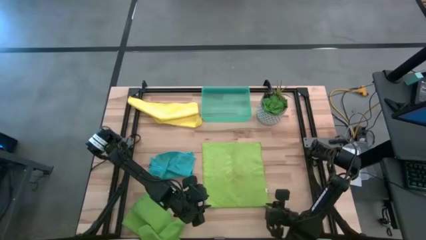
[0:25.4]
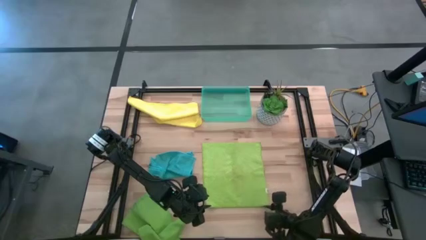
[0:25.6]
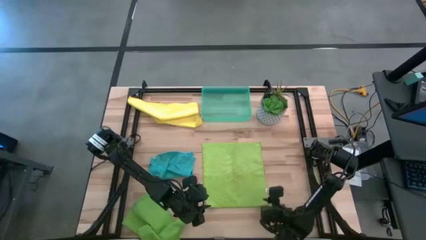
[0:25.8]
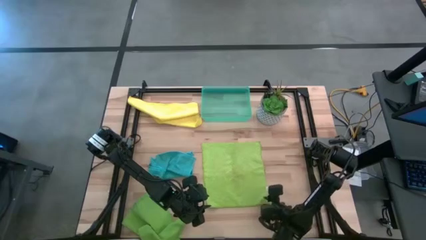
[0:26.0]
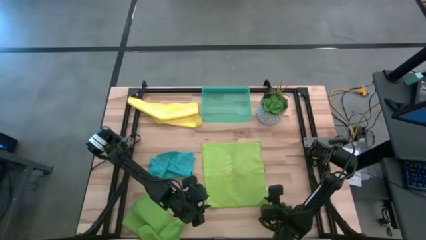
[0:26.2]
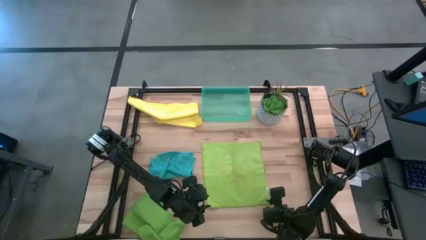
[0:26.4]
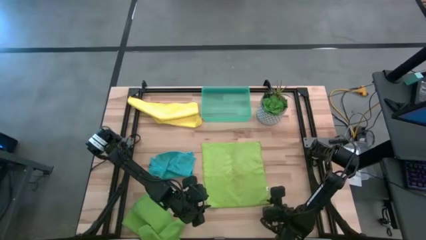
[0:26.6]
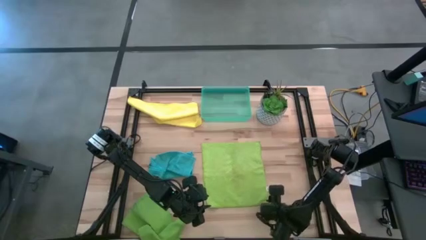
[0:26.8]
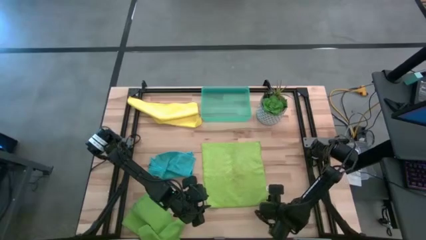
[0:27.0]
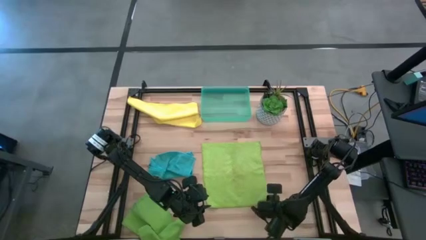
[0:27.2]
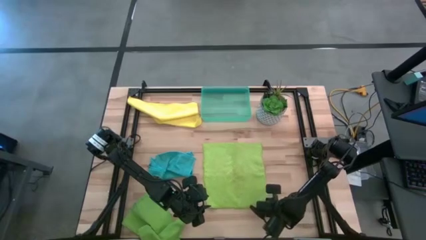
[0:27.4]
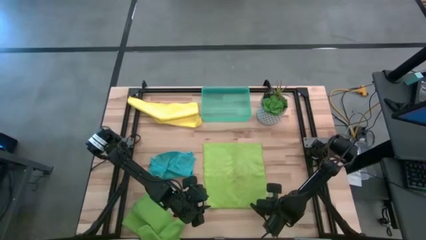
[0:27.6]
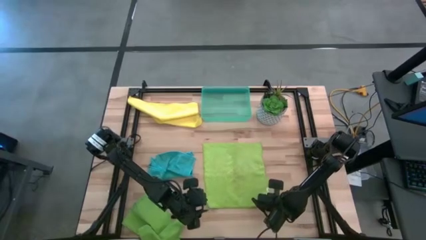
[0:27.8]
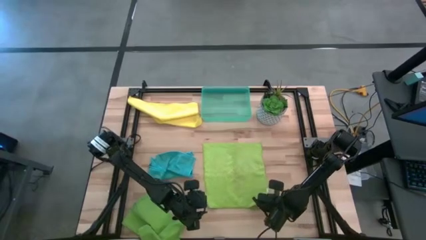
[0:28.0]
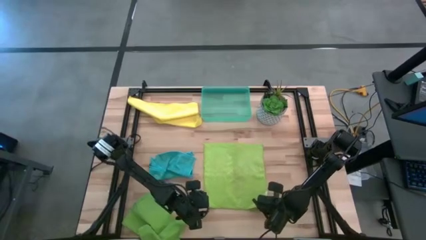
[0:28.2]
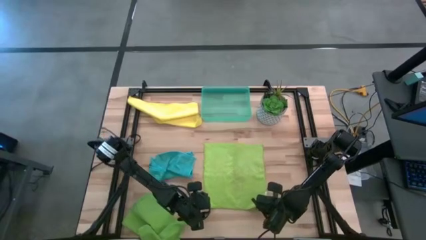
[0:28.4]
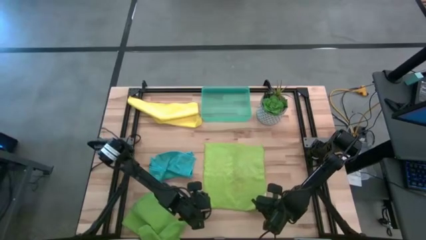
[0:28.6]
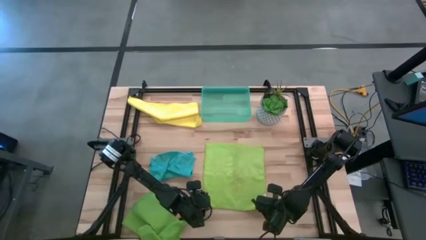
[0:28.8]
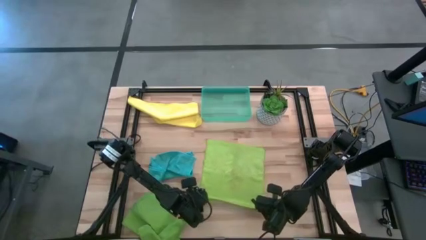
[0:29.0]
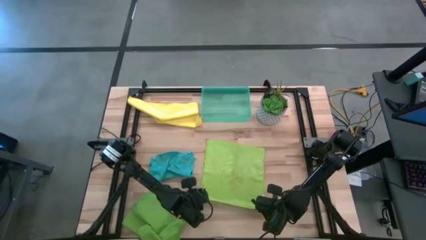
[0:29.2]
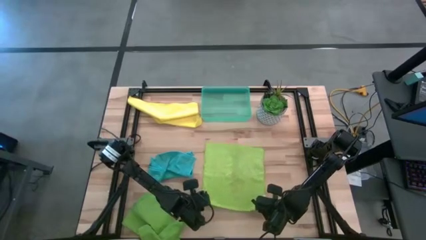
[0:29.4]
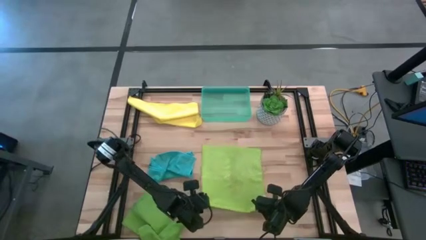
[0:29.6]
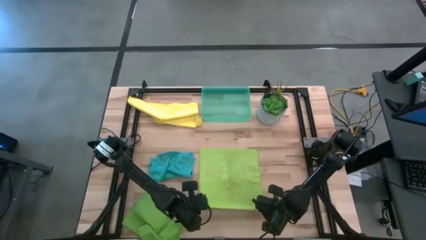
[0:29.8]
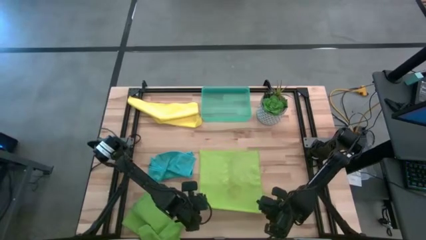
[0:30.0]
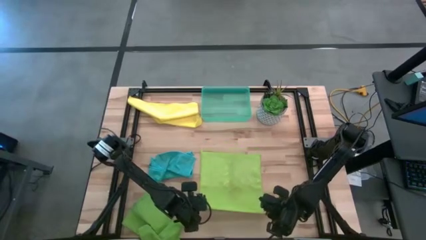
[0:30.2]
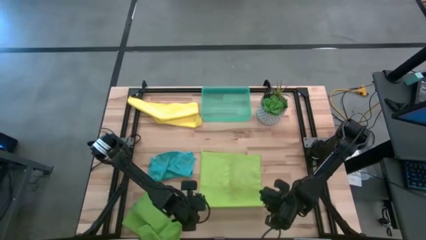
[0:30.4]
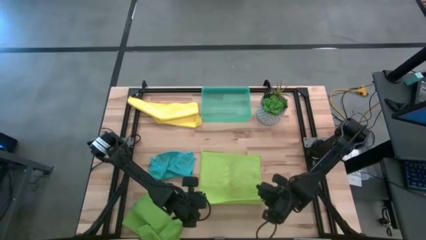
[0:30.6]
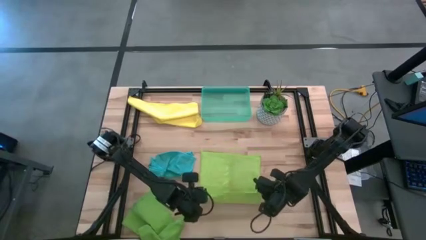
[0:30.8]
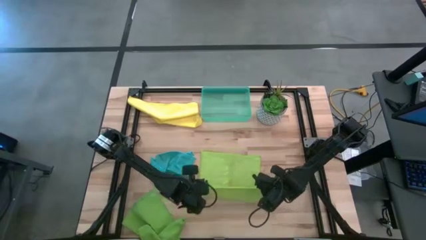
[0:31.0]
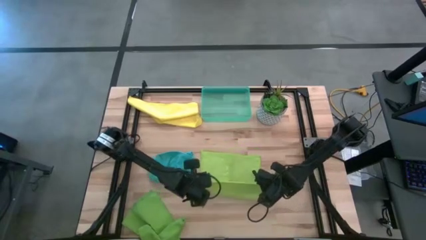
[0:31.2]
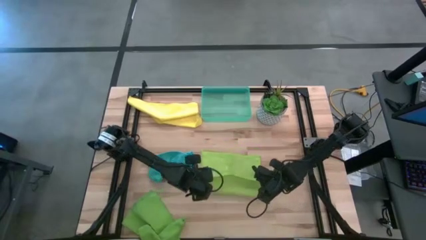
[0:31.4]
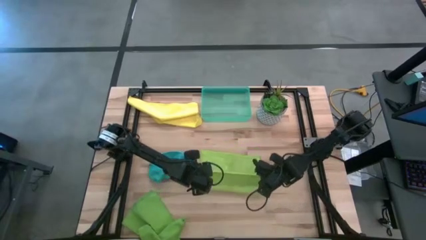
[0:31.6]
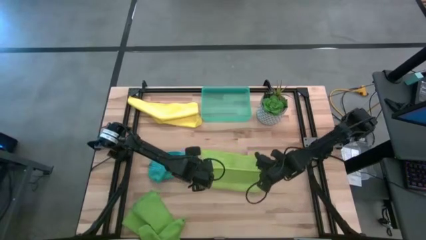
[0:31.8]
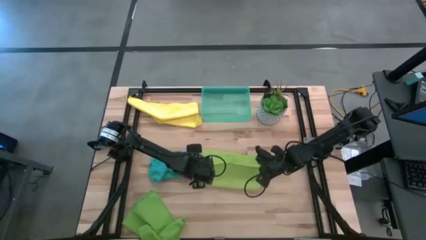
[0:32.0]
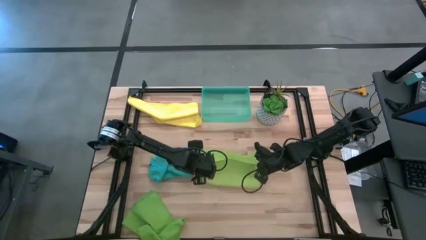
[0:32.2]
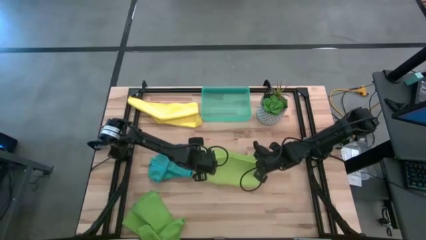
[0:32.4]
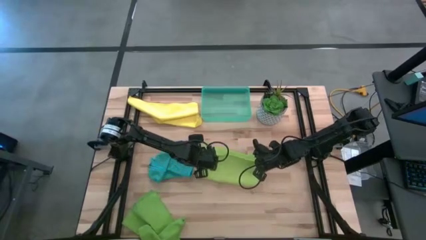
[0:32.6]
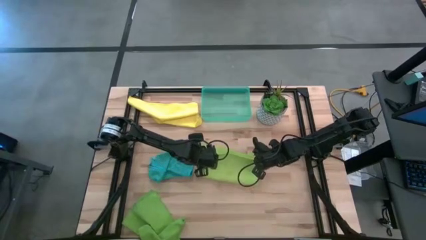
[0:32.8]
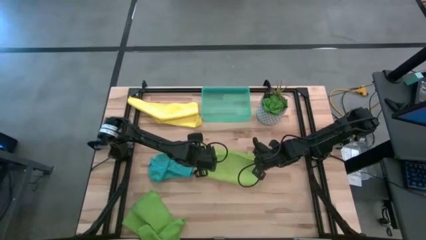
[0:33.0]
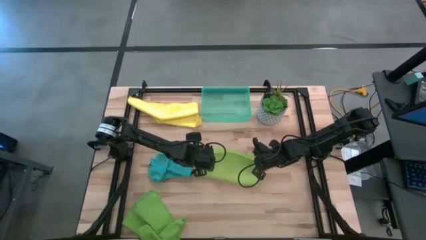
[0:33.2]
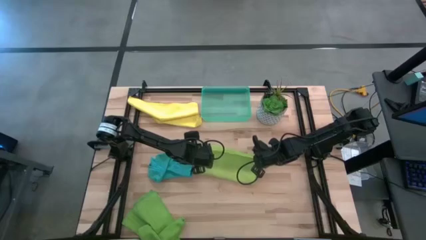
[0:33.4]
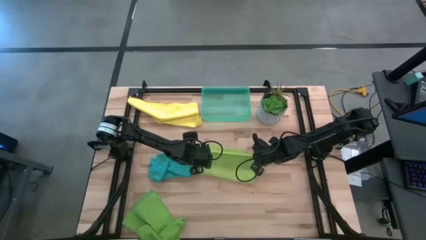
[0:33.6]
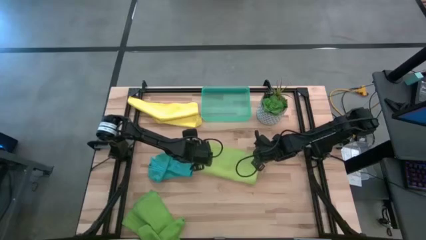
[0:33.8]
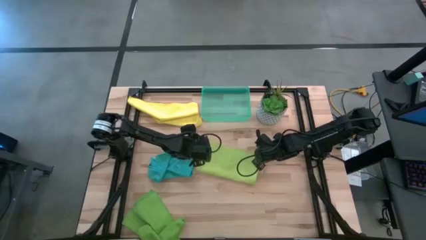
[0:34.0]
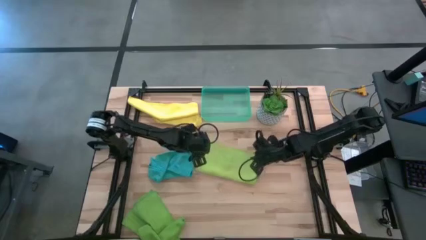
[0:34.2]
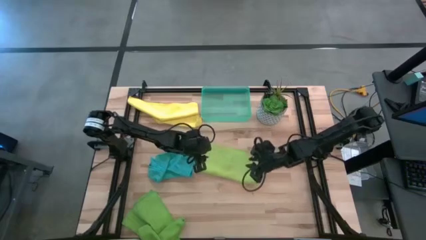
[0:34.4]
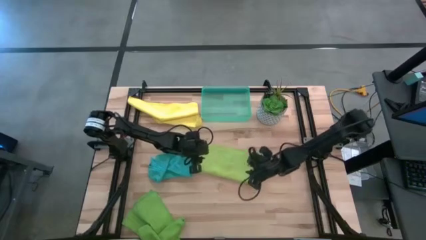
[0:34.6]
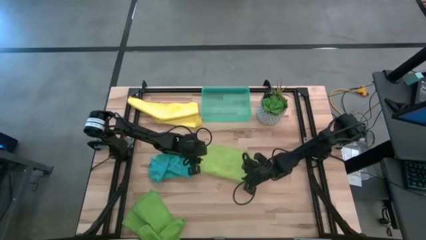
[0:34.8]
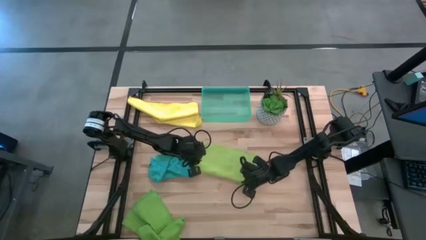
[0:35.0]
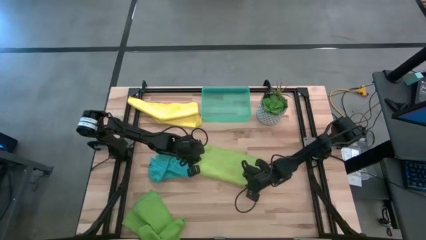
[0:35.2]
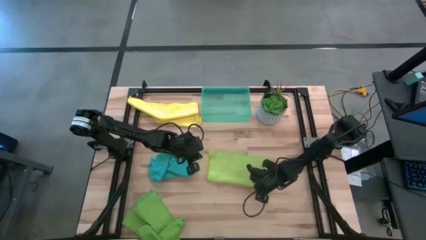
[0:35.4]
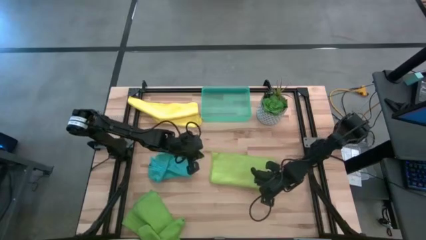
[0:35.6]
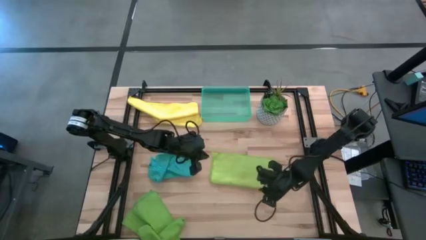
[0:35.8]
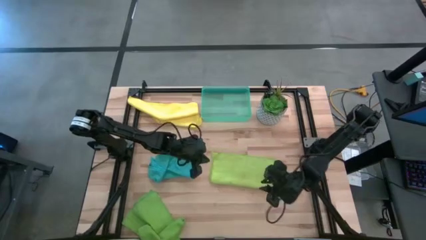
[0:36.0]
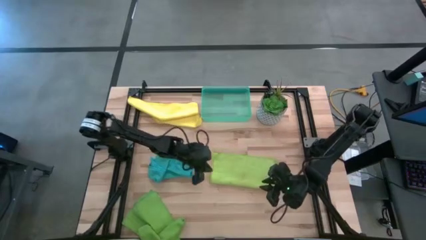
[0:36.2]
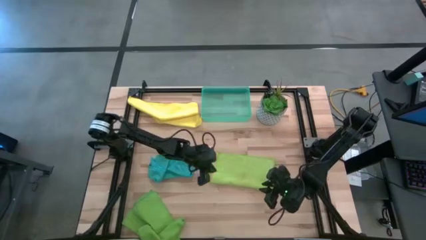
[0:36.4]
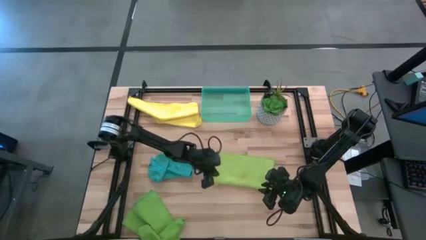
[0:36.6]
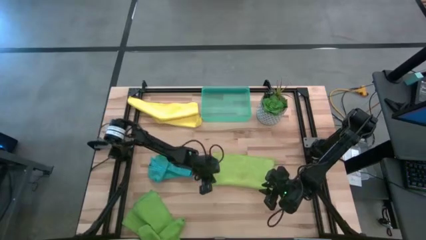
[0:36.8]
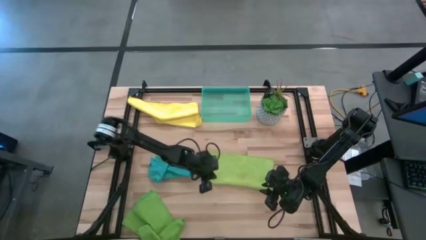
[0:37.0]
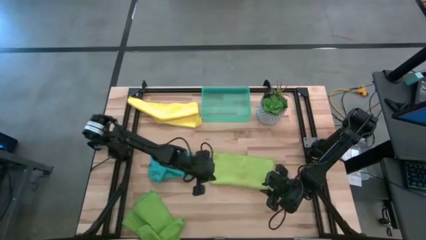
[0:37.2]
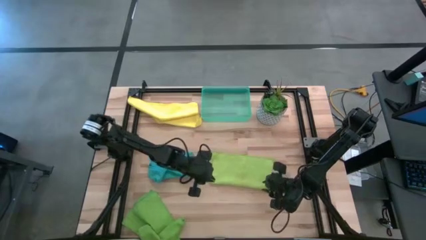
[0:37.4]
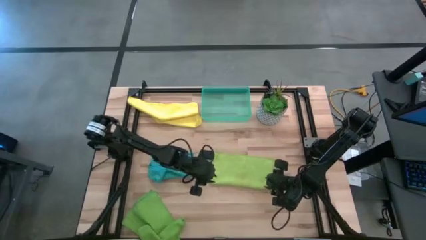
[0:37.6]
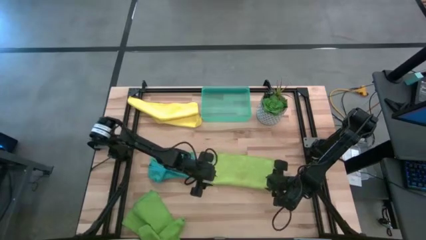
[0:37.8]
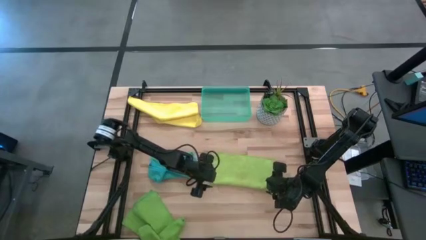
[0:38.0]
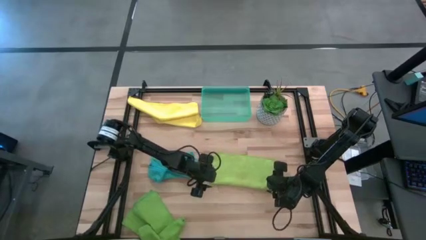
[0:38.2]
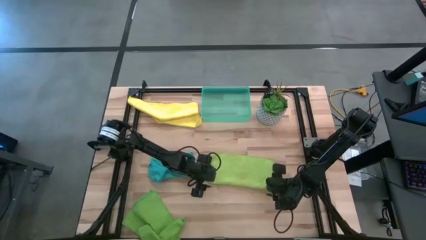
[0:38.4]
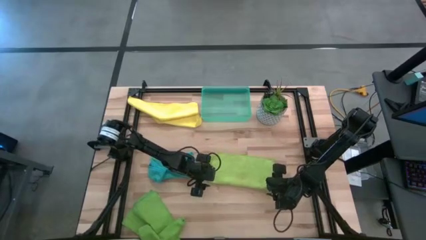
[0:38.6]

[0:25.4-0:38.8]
Task: Fold microfiber towels
Fold the light green microfiber cloth
